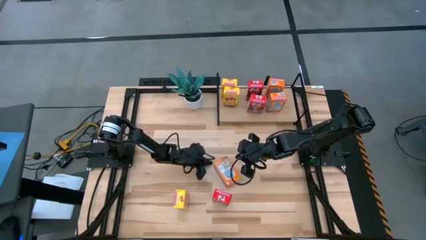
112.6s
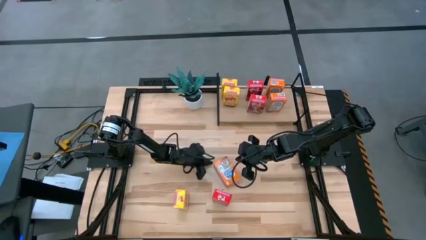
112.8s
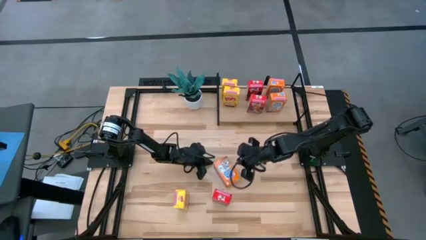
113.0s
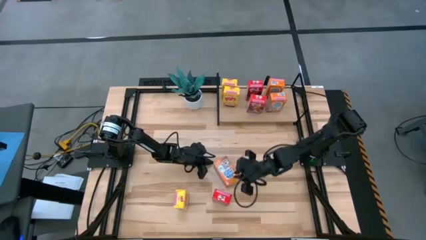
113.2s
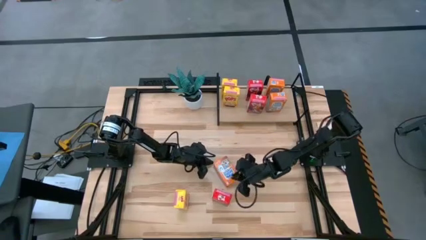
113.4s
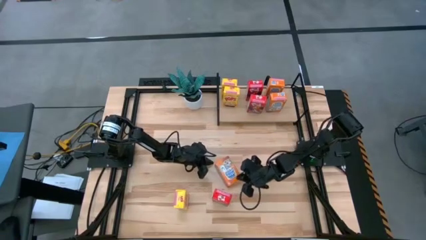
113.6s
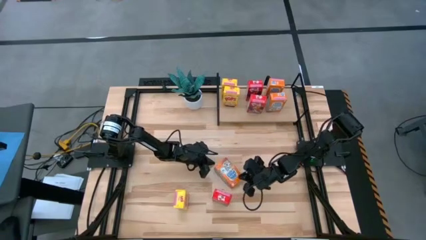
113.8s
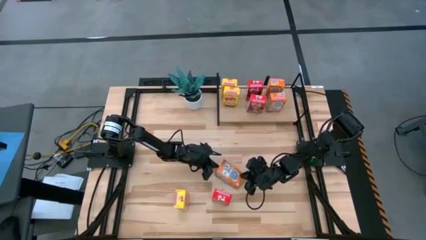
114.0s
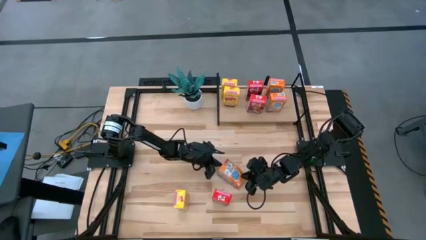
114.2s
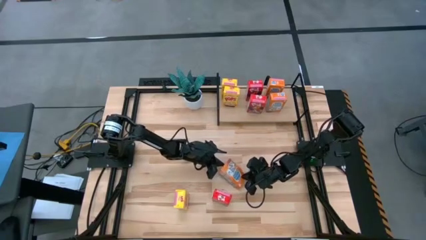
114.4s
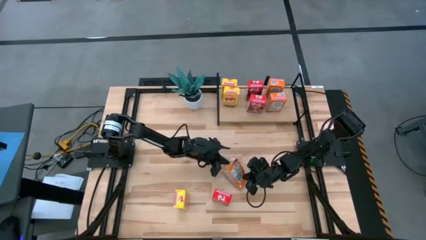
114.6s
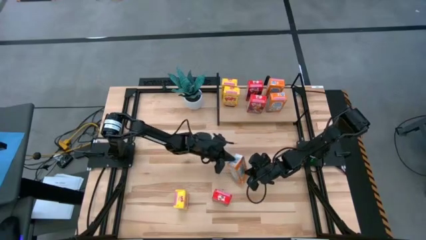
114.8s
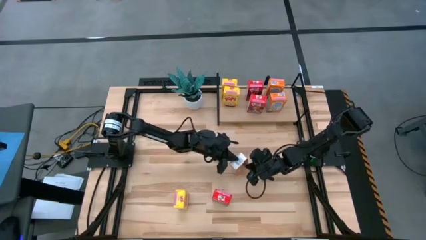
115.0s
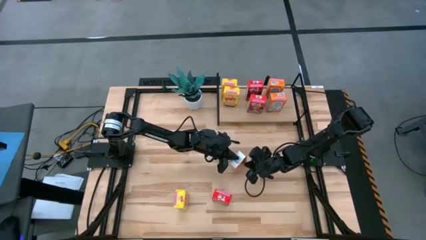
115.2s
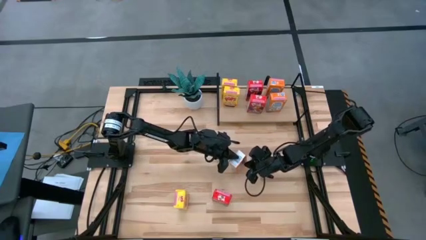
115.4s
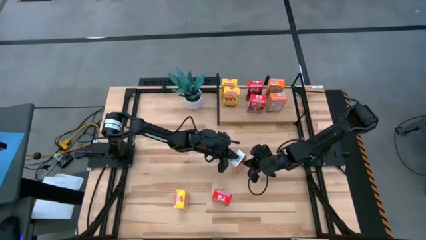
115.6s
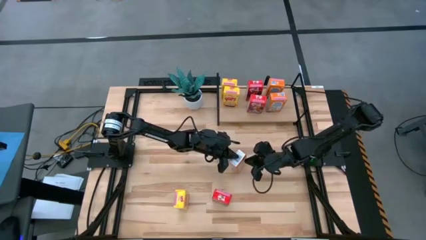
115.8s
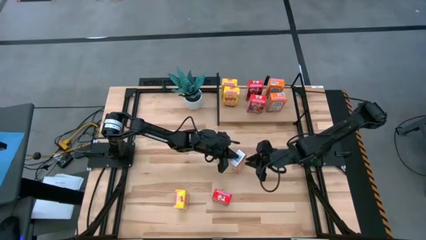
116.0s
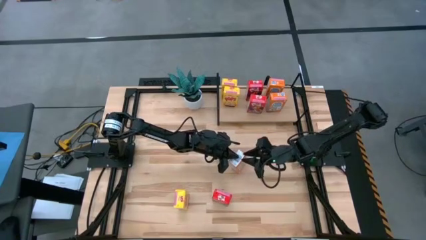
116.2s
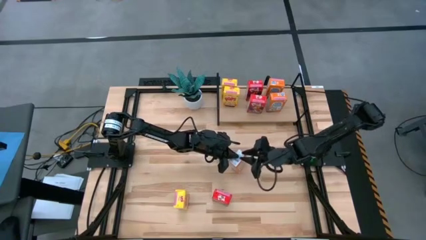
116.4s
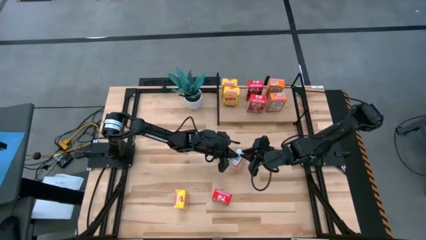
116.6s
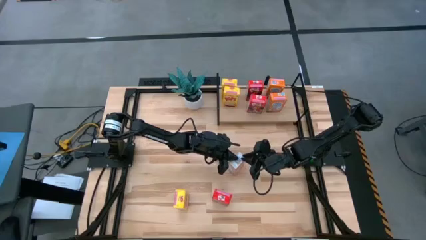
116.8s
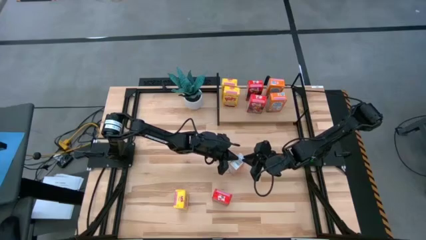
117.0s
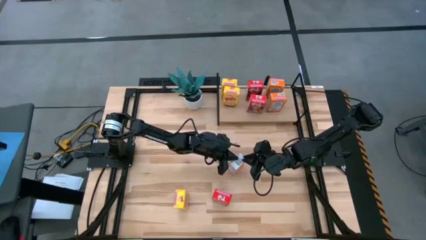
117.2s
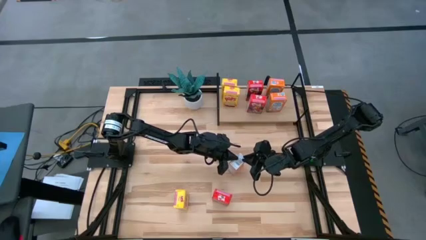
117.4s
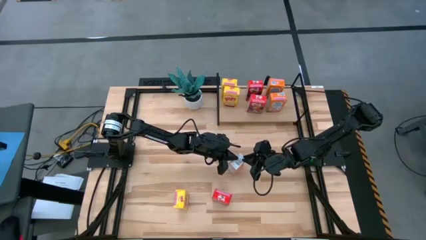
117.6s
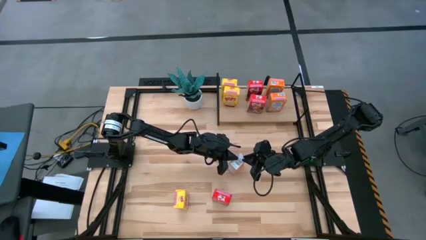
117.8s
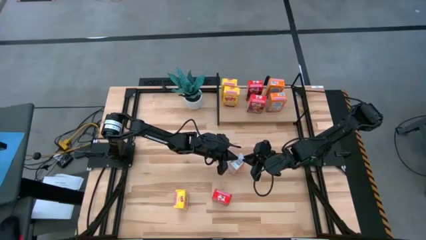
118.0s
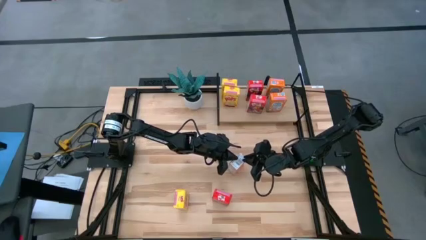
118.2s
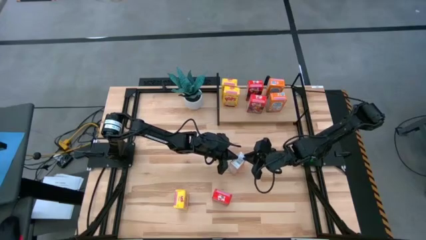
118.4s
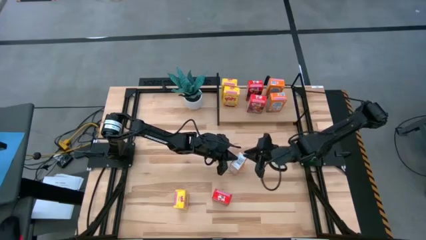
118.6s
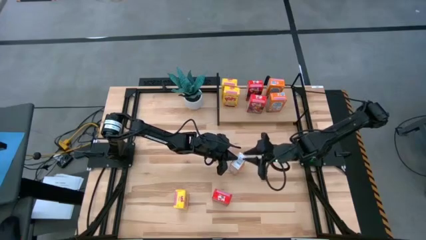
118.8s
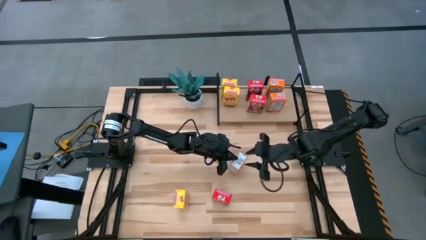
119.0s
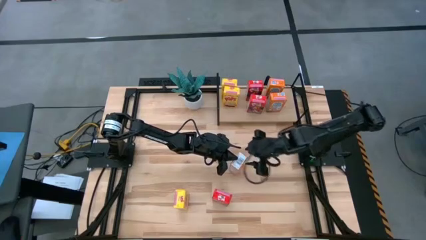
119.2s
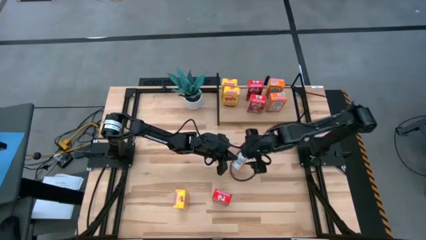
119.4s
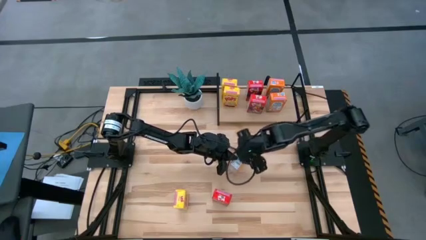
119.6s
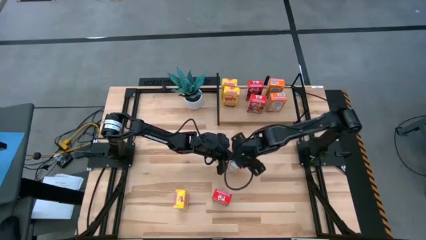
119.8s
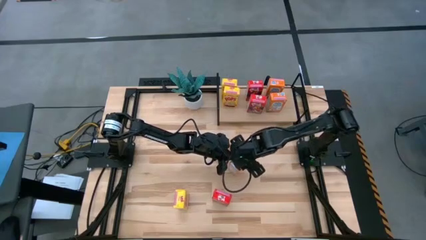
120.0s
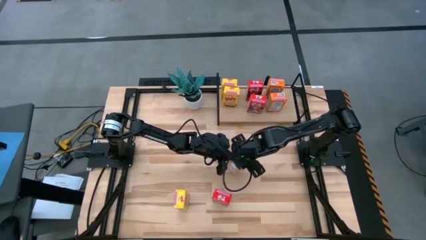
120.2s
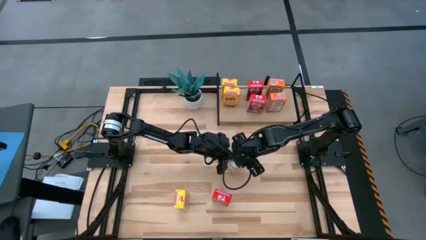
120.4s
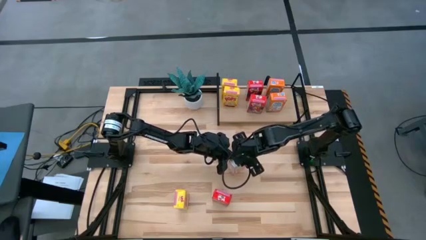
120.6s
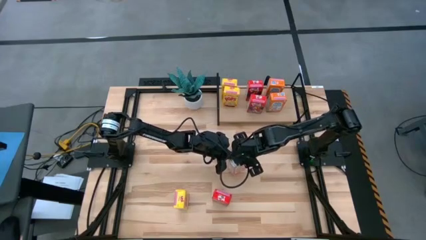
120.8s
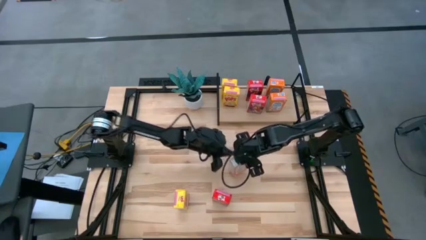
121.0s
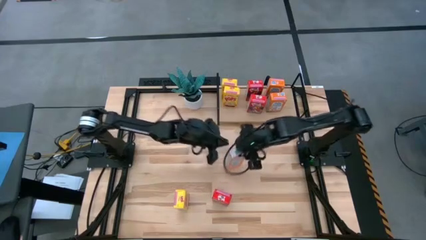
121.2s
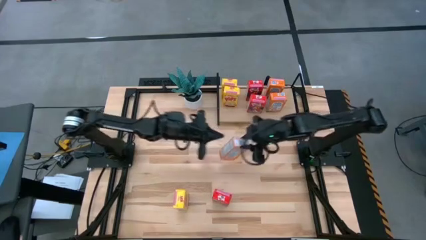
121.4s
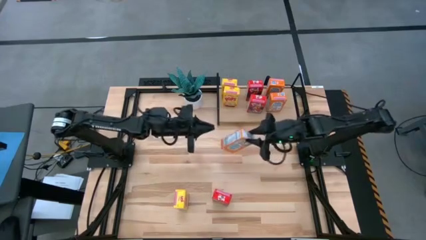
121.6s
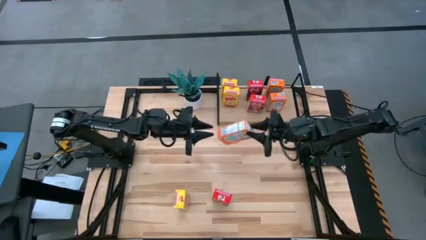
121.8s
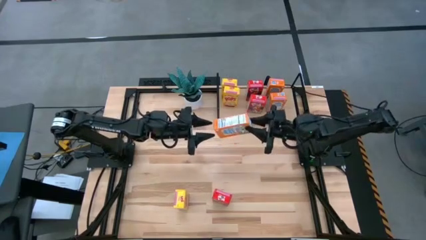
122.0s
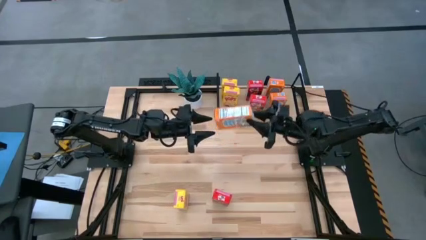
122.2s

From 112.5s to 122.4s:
Task: Stack cereal on shelf
Put the orange cereal box on the shelf aligned with orange cereal boxes

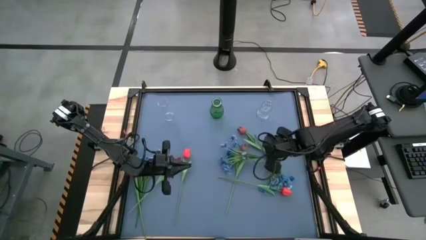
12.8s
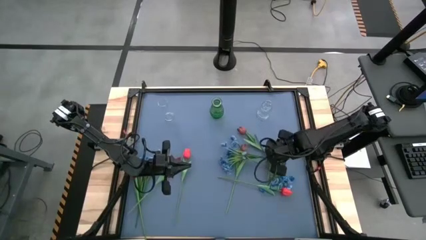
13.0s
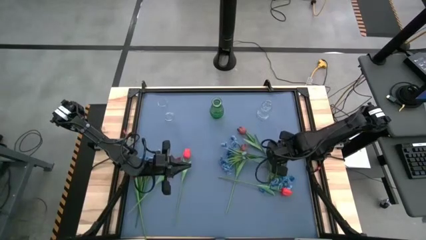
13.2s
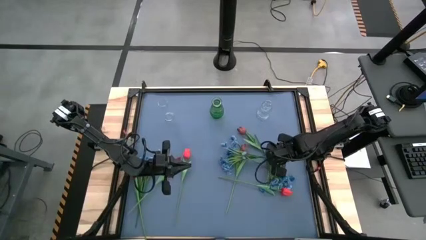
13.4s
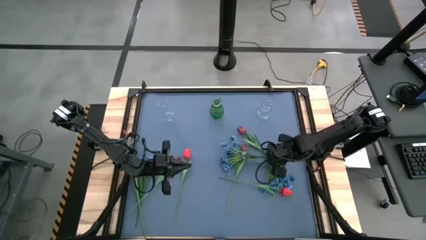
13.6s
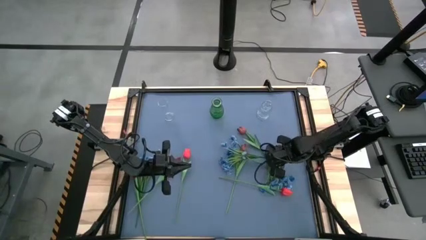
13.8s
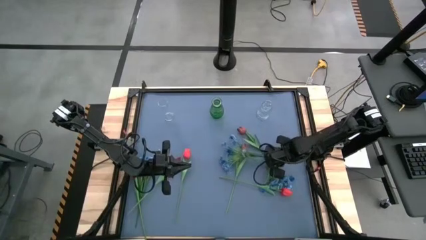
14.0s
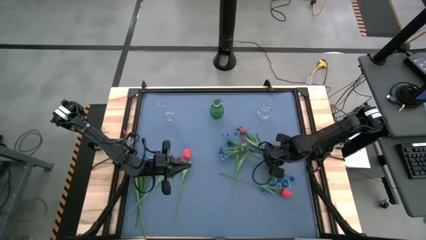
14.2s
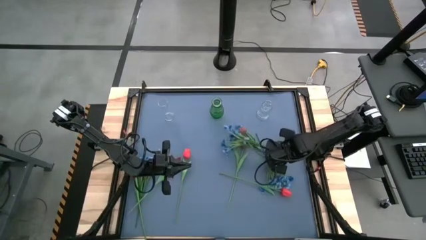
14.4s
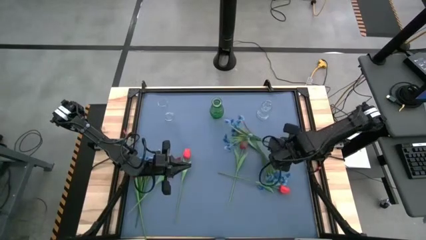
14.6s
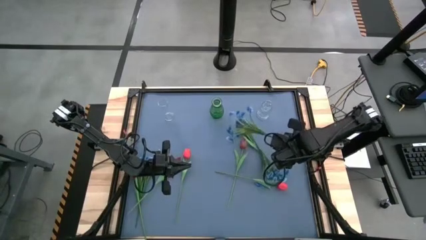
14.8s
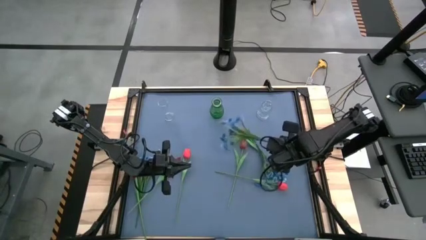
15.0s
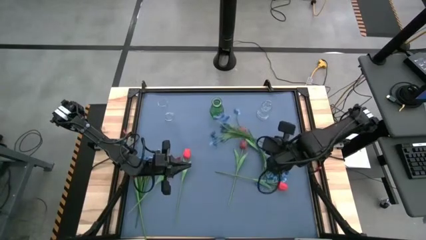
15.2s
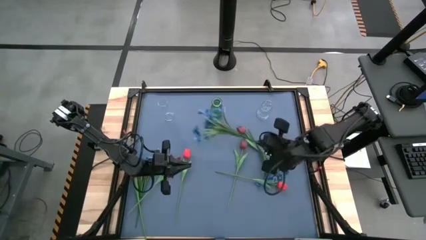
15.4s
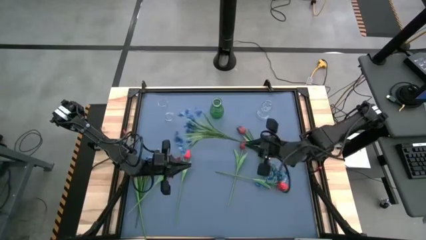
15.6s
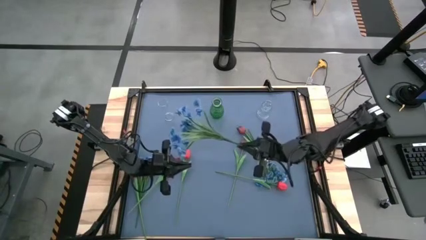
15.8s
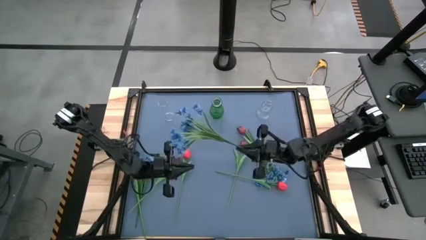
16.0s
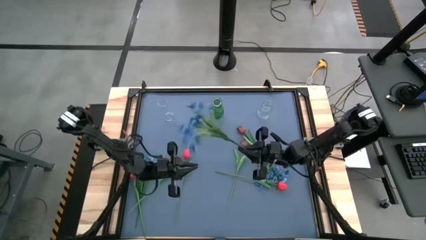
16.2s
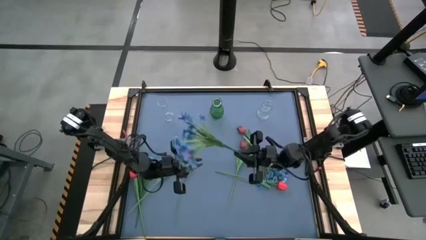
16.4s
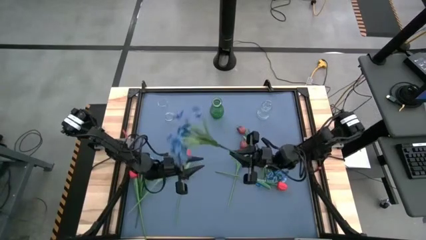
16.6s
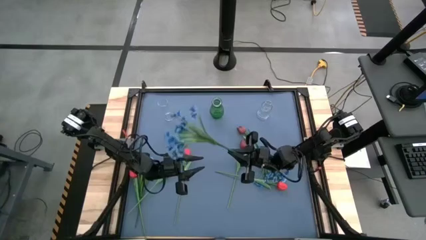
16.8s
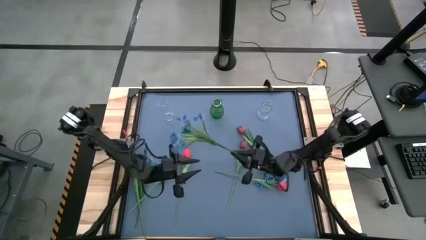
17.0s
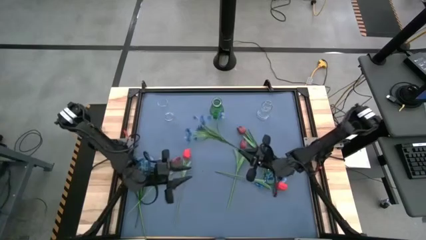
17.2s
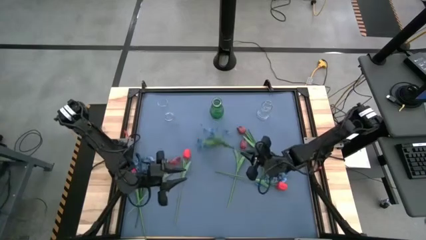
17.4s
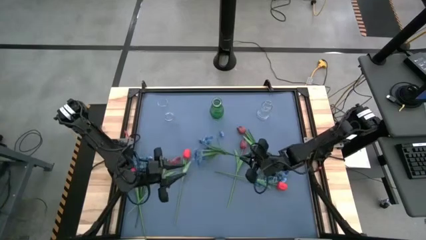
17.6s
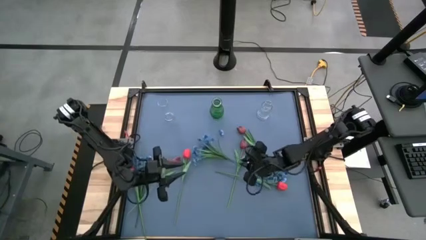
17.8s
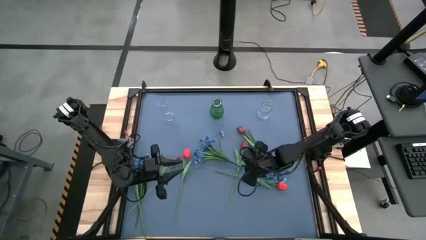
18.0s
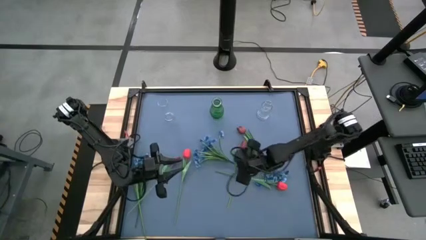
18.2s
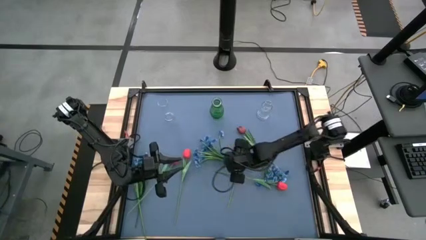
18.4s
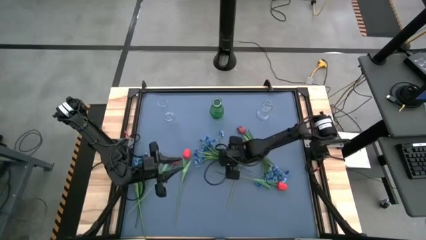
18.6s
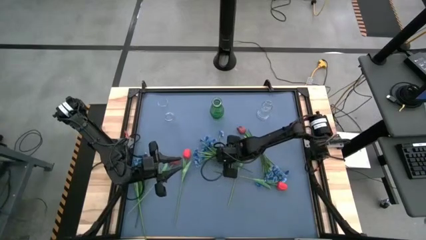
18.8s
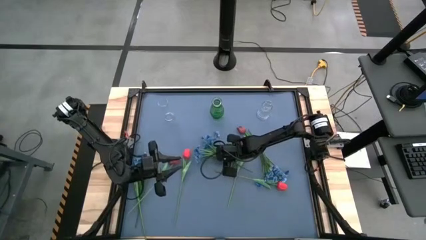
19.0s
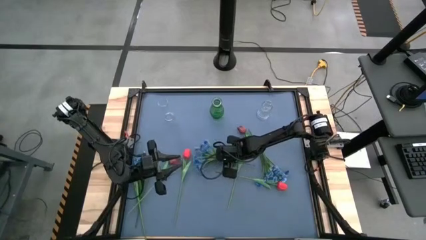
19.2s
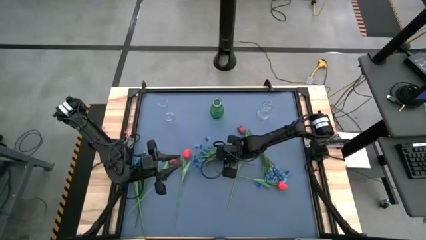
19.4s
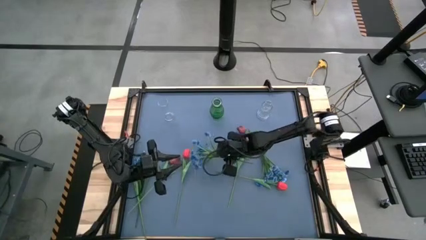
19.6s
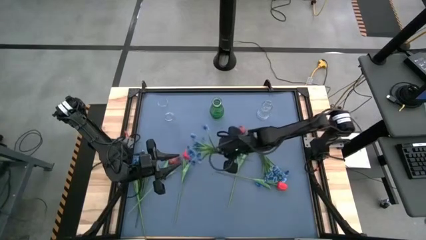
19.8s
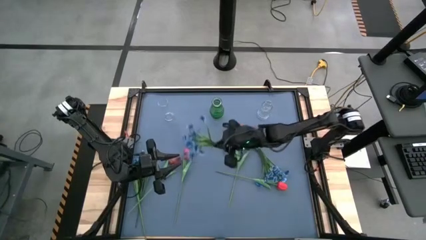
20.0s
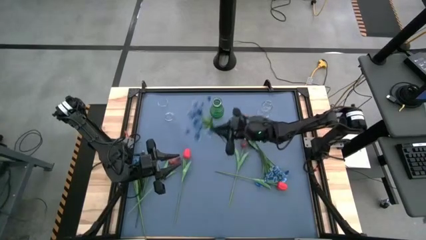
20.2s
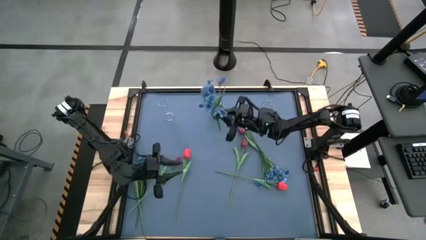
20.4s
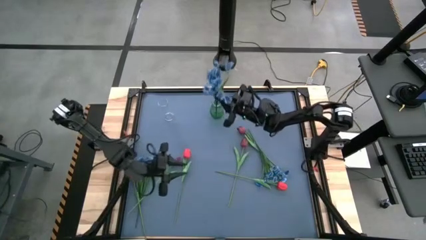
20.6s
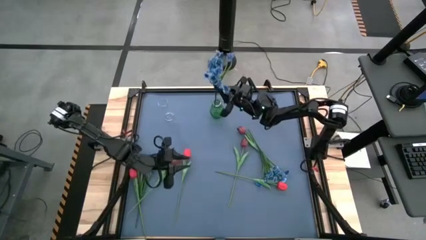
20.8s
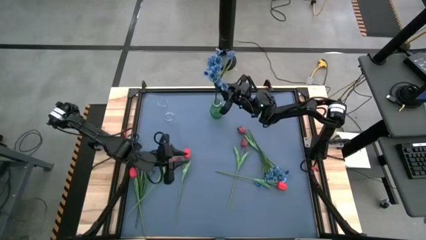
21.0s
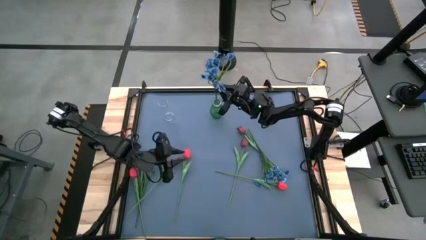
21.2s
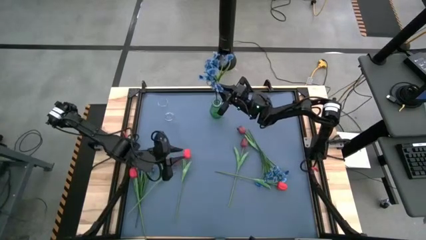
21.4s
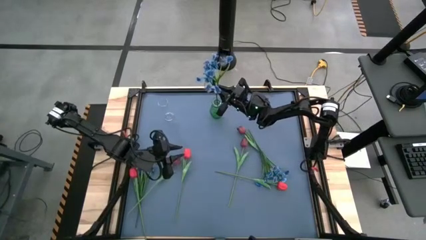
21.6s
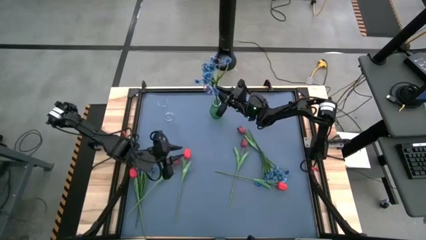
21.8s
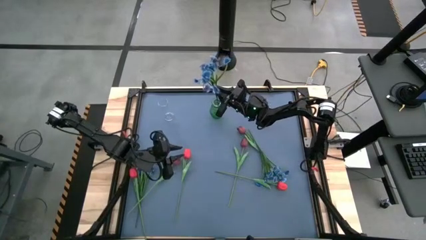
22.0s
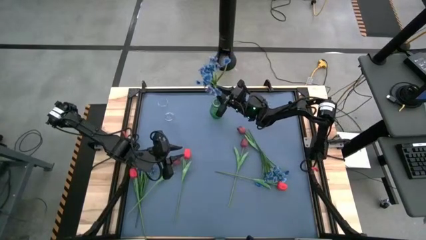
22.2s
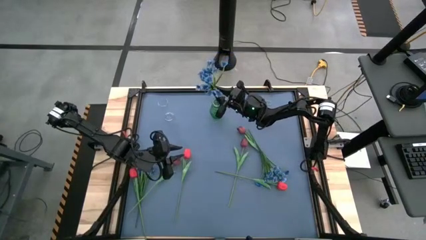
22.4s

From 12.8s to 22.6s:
Task: Sort flowers into vase by color
Put the center blue flower into the green vase
